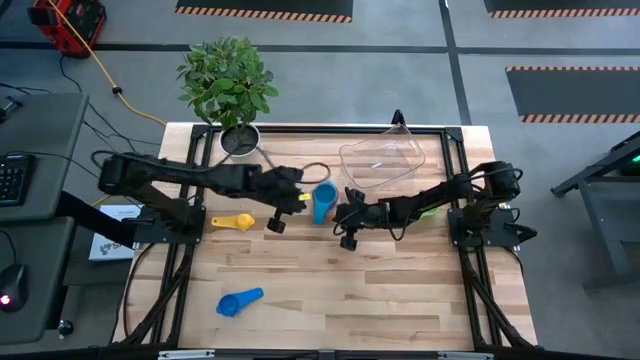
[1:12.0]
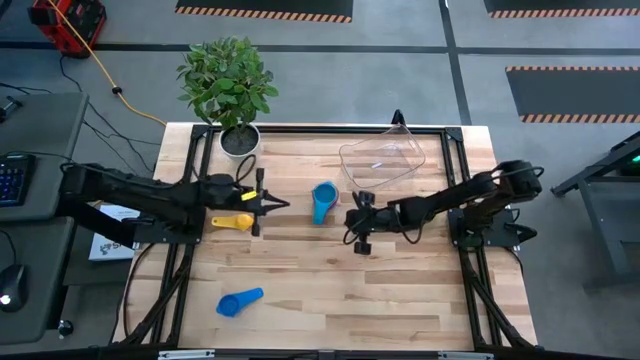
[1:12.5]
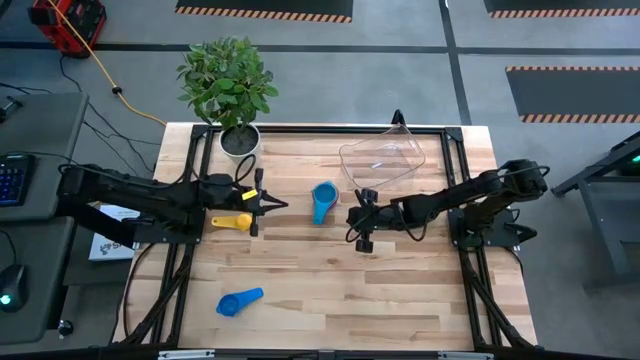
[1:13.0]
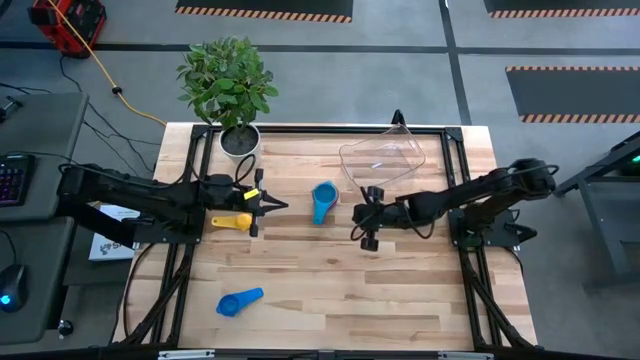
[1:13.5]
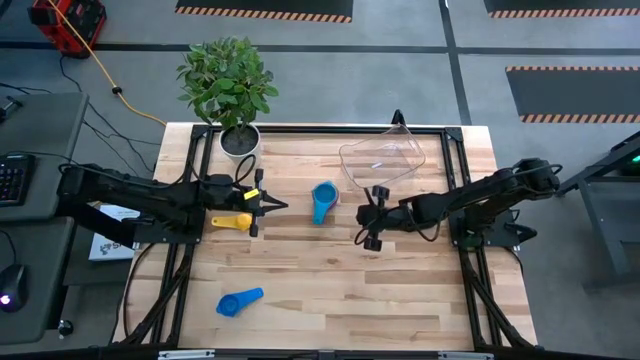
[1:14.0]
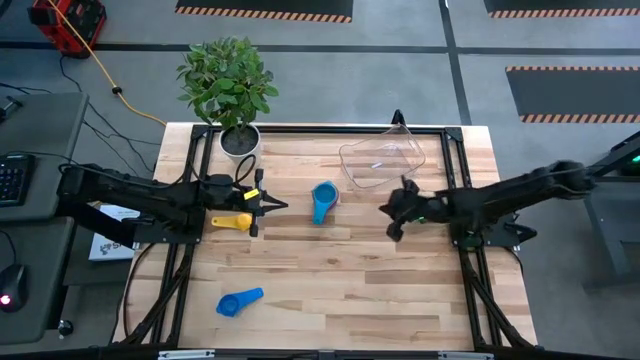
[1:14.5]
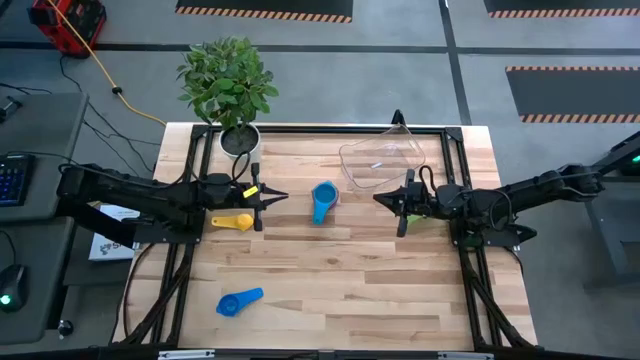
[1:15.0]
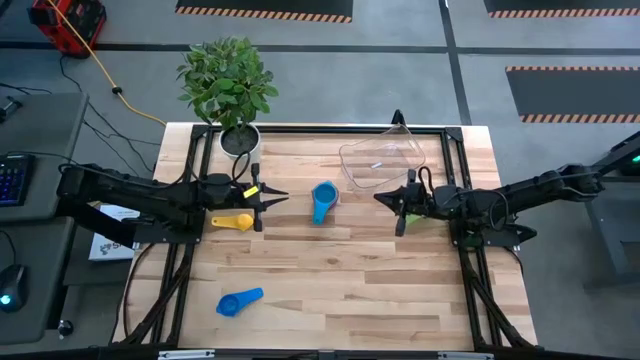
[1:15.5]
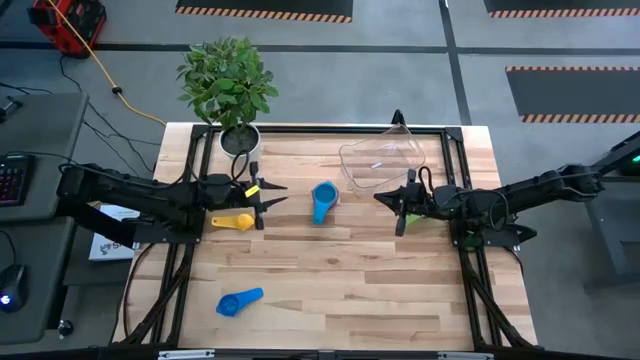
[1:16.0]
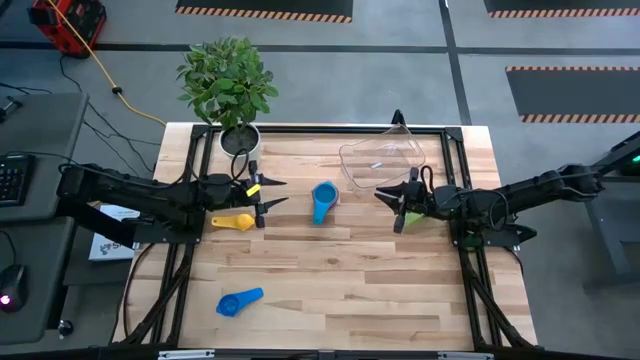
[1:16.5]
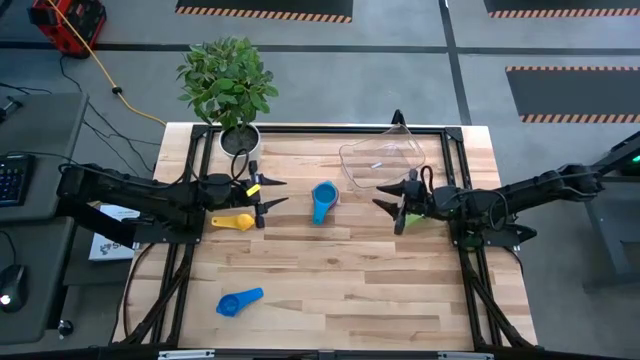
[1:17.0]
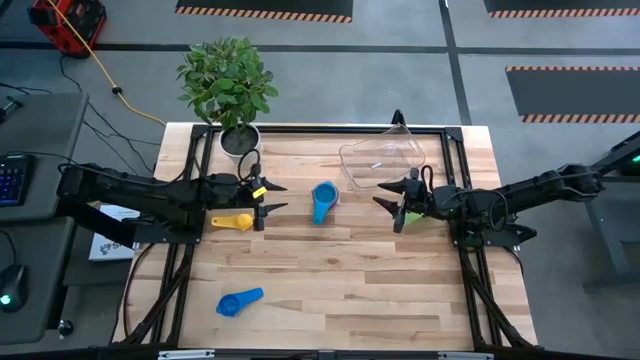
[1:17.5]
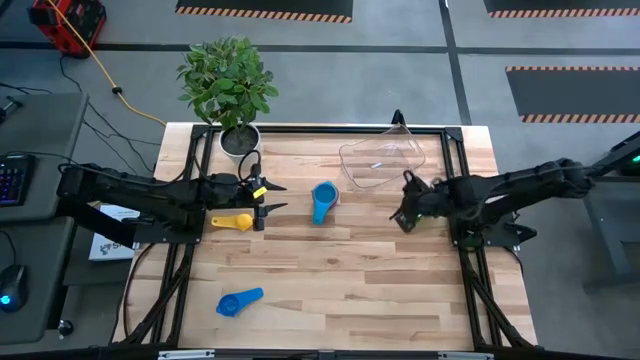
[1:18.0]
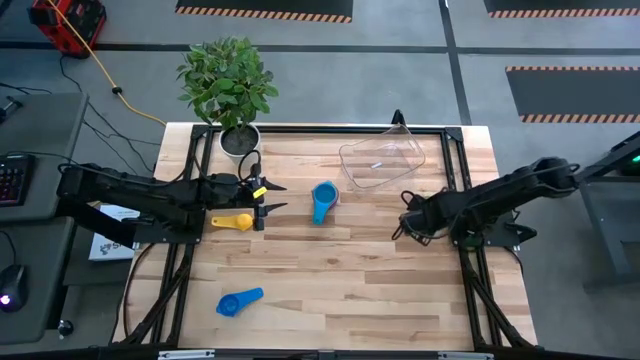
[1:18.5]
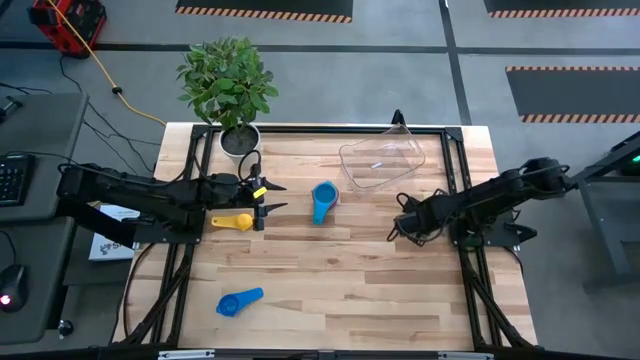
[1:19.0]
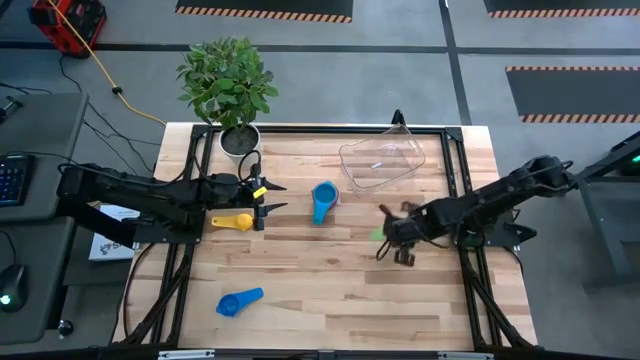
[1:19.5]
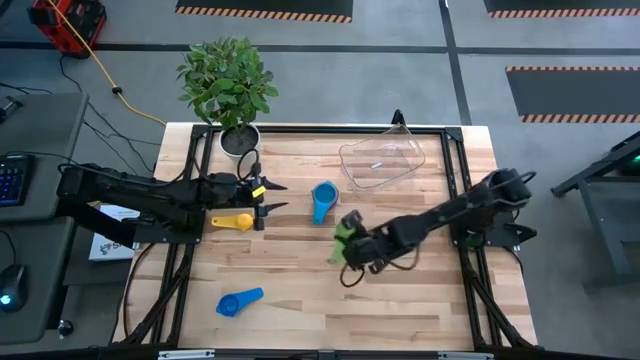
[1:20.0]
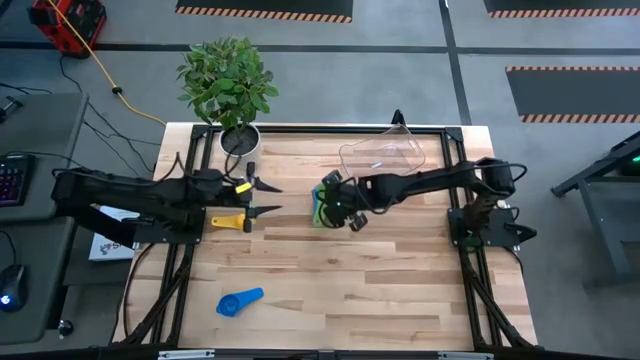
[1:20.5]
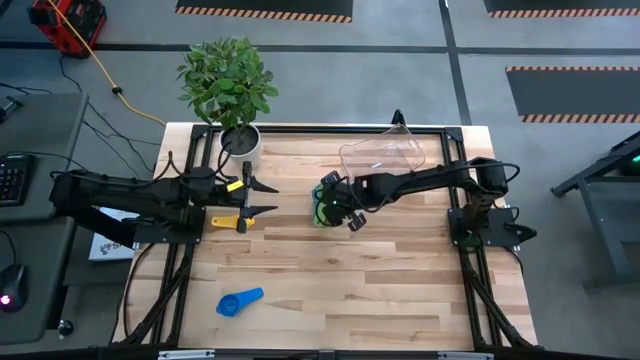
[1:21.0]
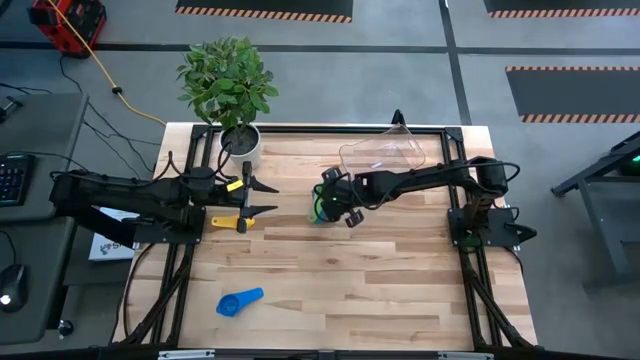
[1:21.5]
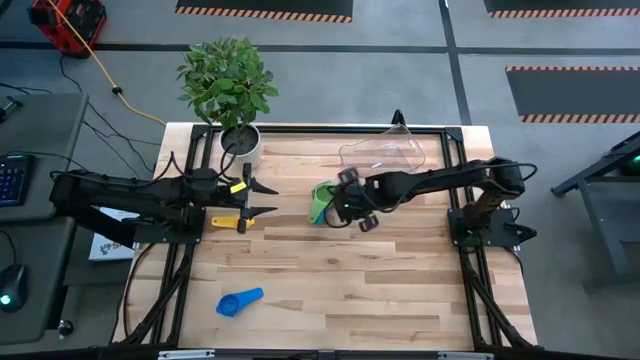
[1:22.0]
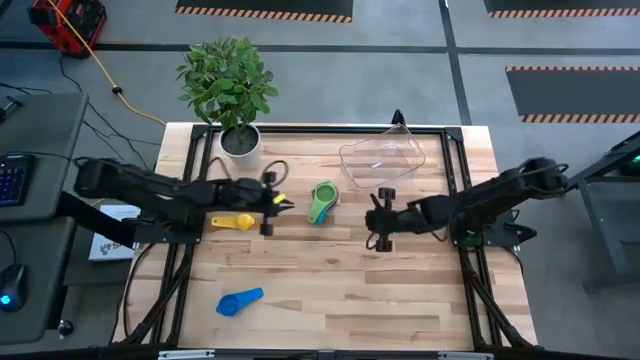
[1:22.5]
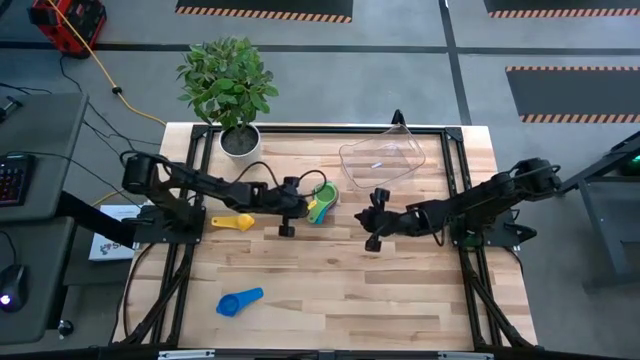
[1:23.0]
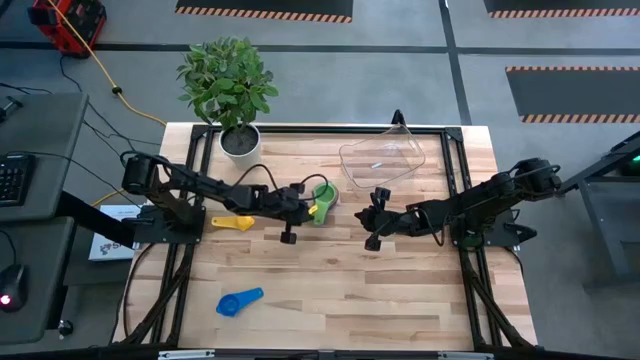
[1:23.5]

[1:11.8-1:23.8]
Task: Nest measuring cups in basket
Stack the green measuring cup on top of the light blue measuring cup

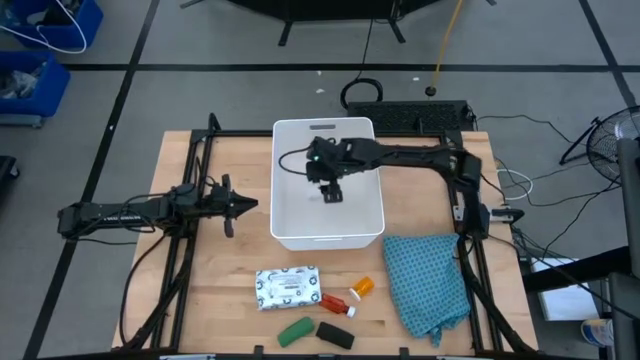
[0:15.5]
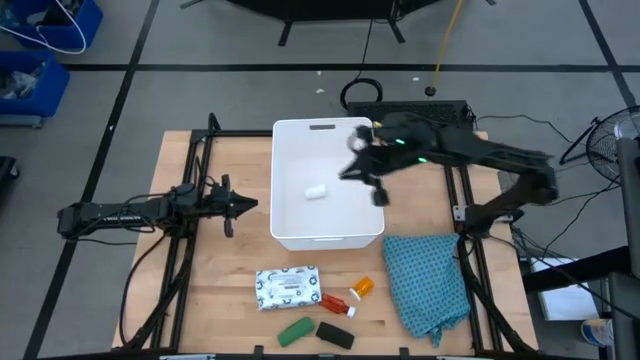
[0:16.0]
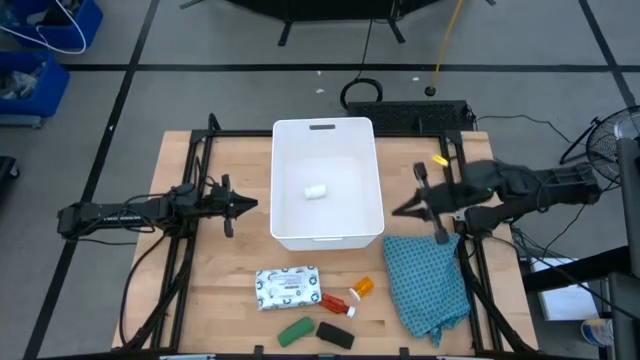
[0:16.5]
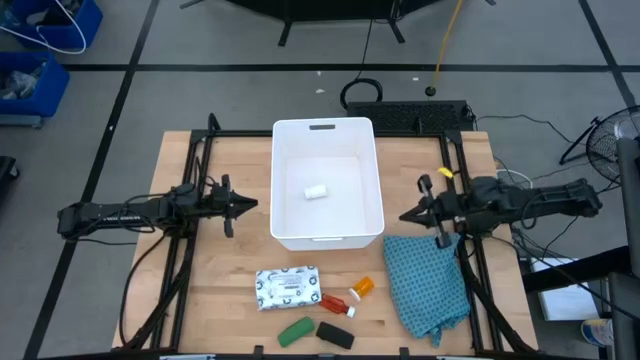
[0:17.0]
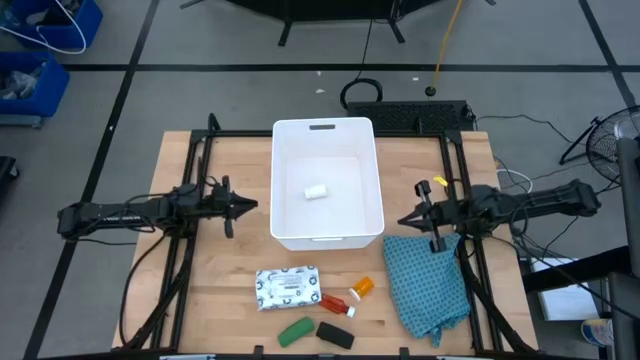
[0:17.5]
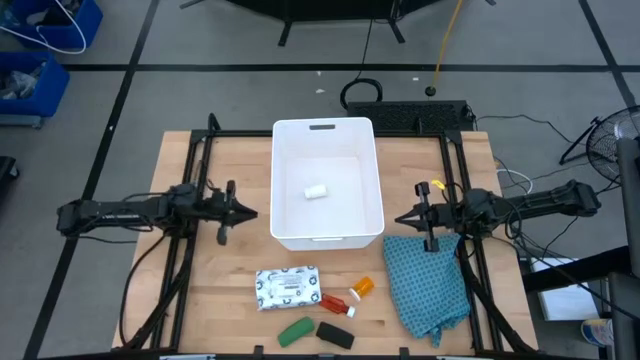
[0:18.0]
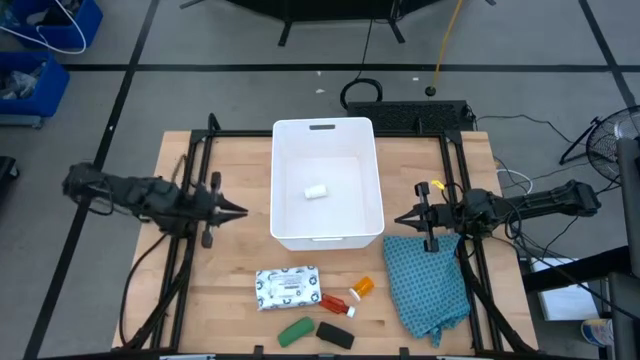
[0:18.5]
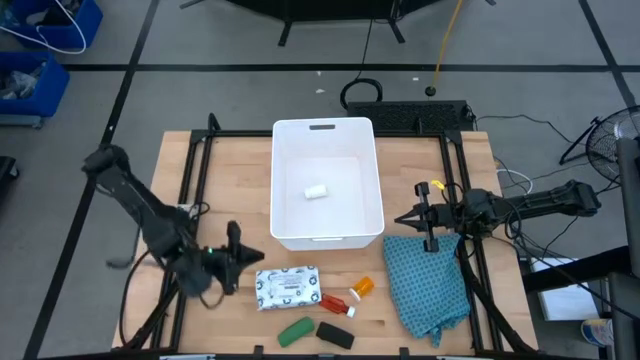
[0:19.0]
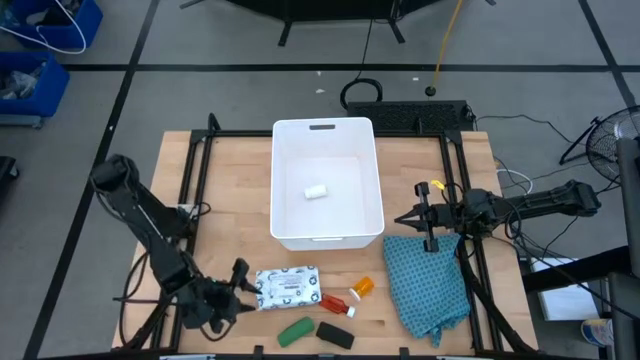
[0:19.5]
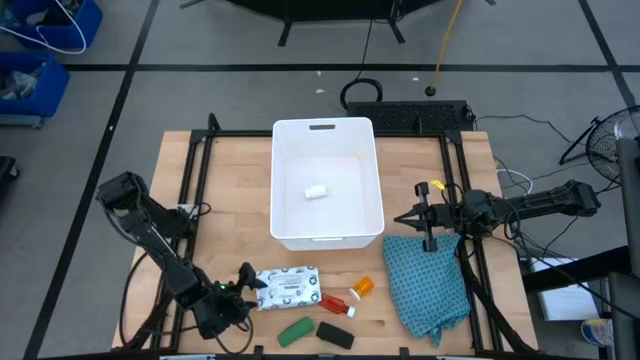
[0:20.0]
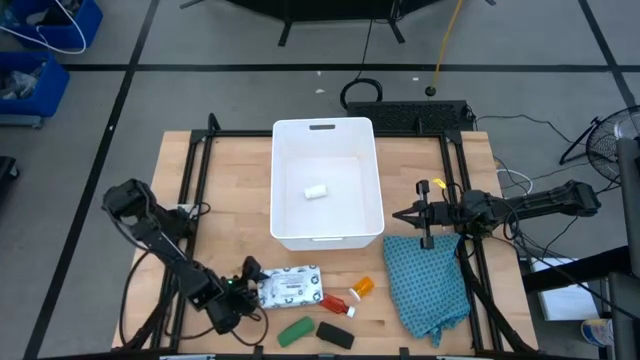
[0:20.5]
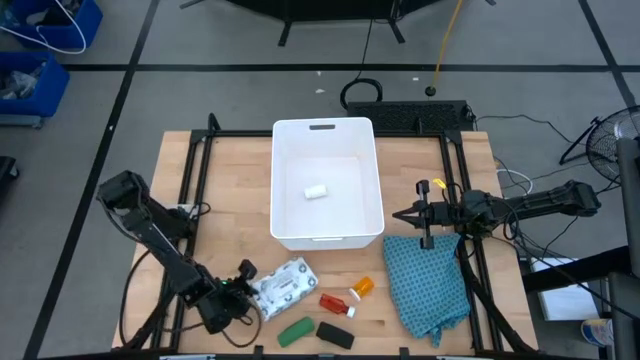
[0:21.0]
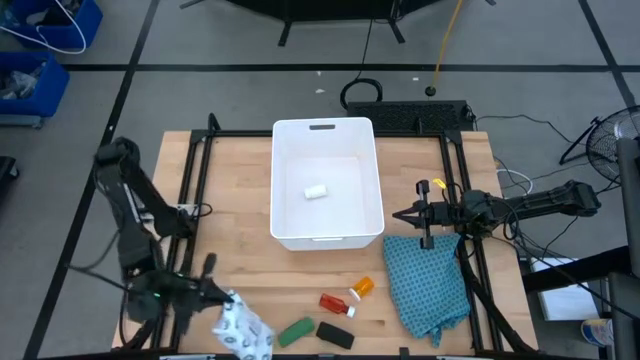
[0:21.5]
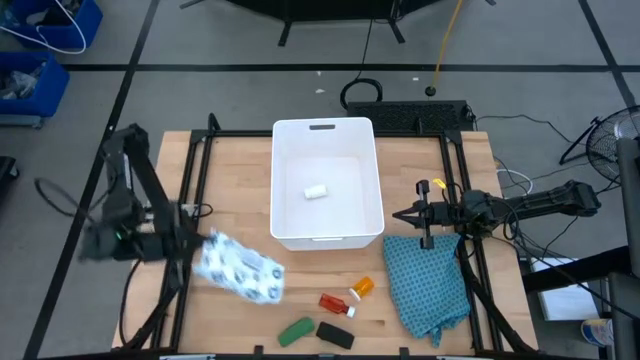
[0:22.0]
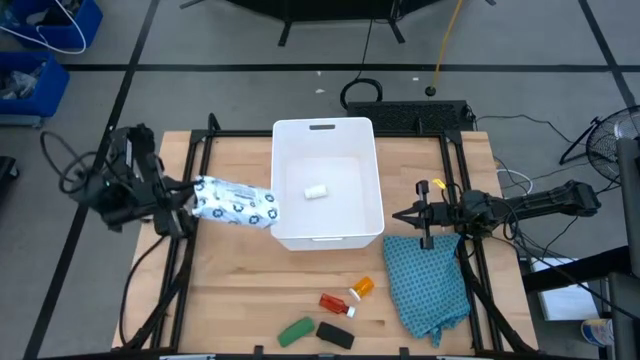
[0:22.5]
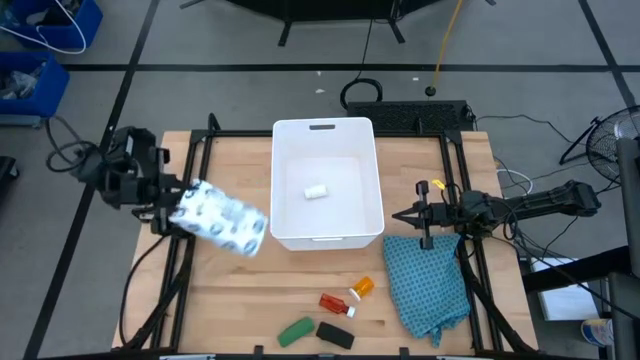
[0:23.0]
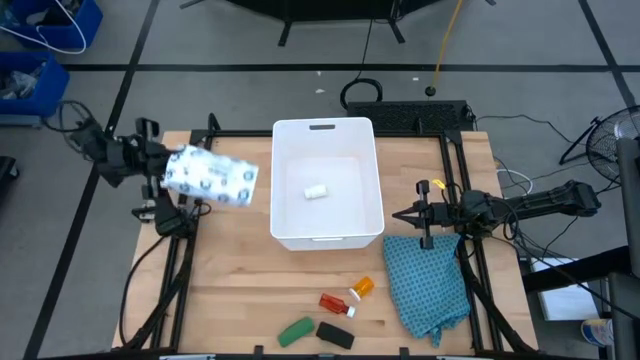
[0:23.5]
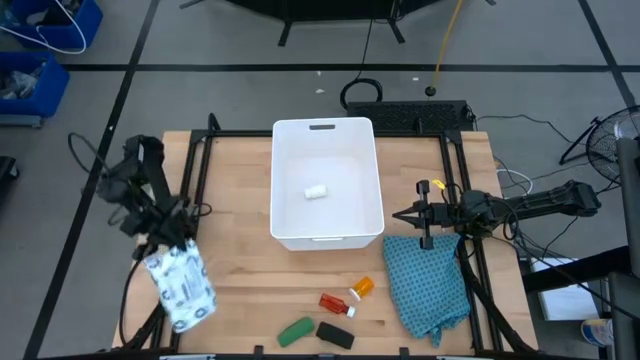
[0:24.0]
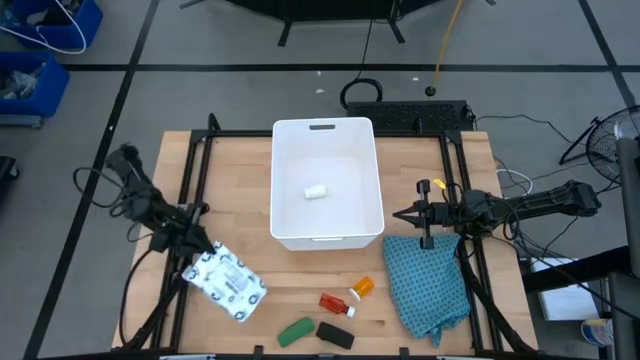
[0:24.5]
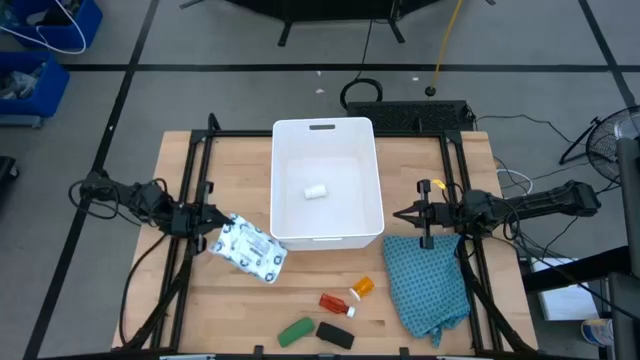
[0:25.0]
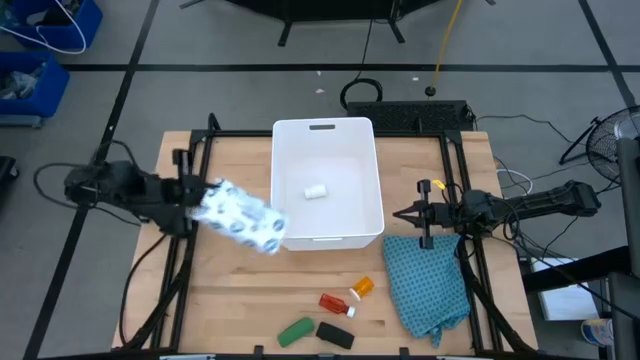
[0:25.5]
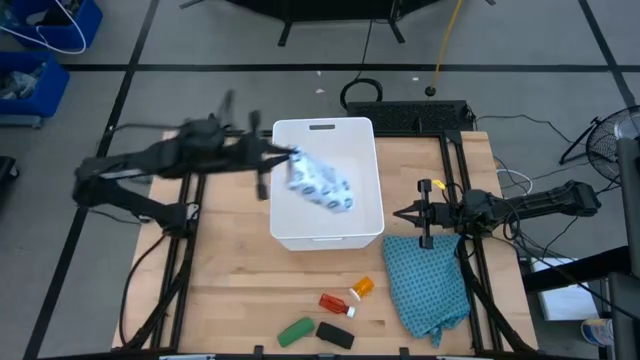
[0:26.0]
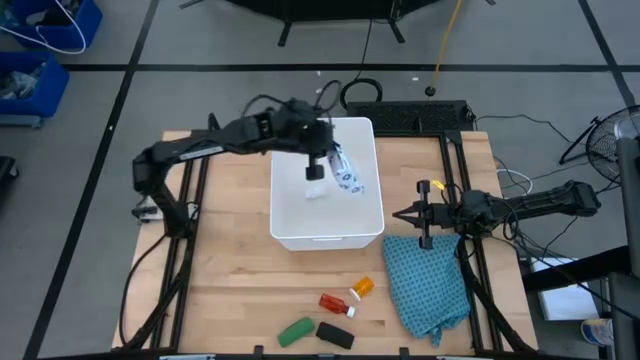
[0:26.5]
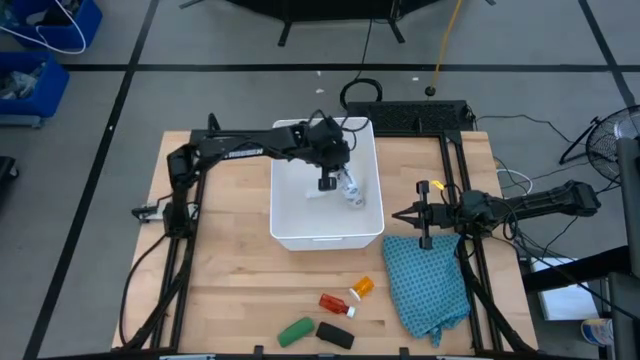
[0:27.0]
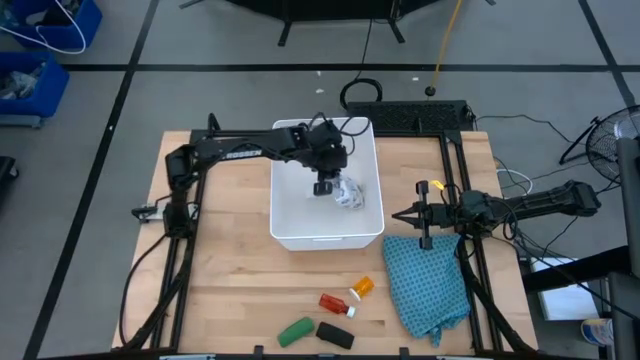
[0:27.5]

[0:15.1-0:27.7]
Task: Pick & place medical supplies in basket/bin
Put the white mailer bag into the white bin
